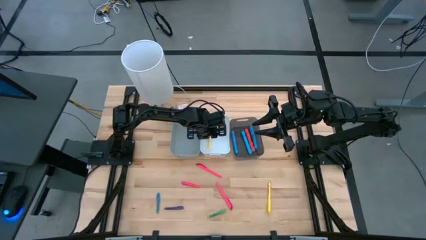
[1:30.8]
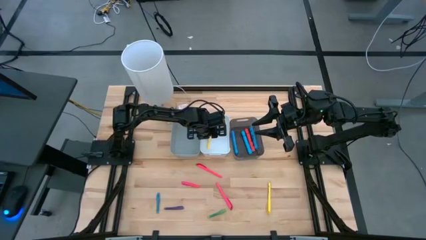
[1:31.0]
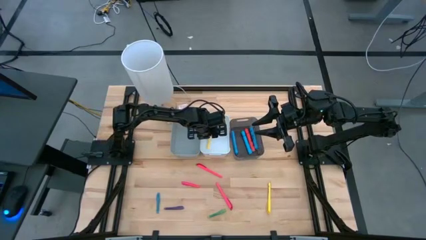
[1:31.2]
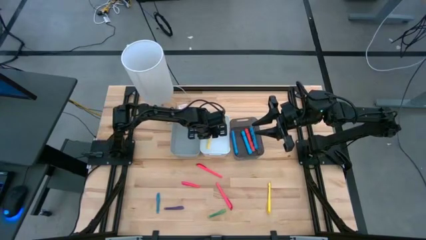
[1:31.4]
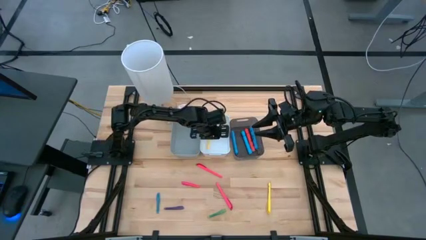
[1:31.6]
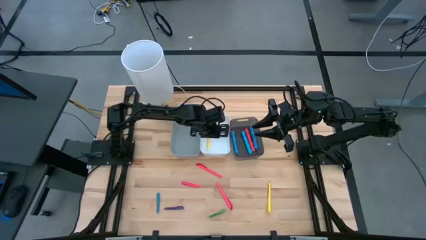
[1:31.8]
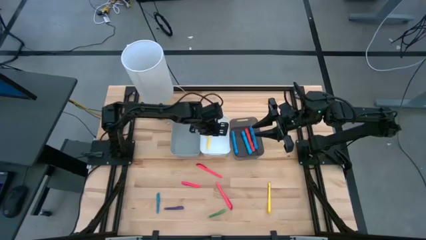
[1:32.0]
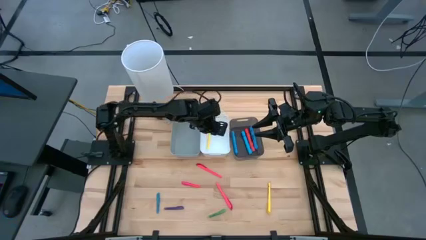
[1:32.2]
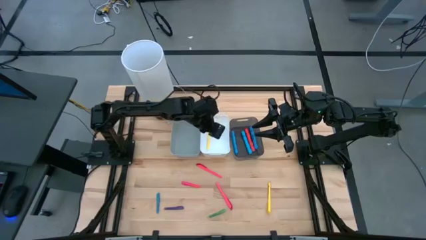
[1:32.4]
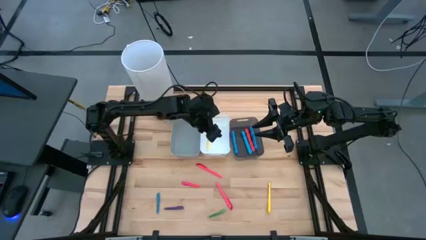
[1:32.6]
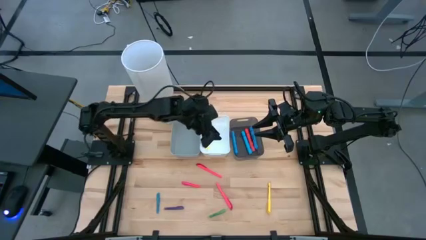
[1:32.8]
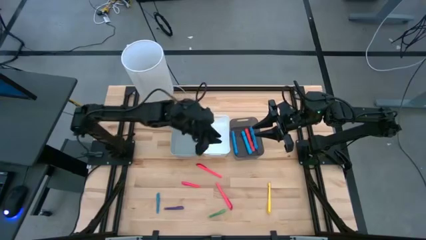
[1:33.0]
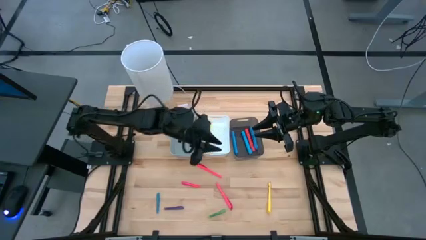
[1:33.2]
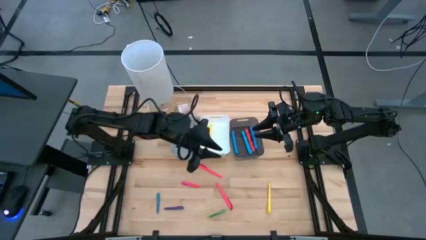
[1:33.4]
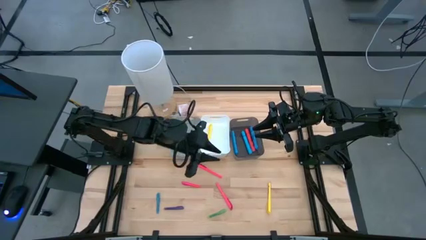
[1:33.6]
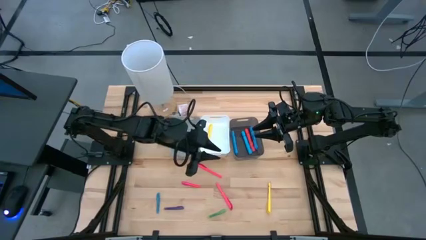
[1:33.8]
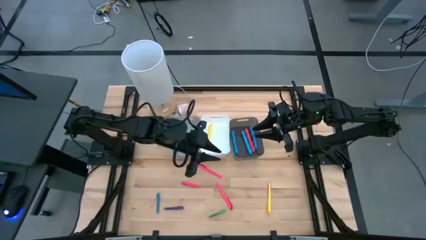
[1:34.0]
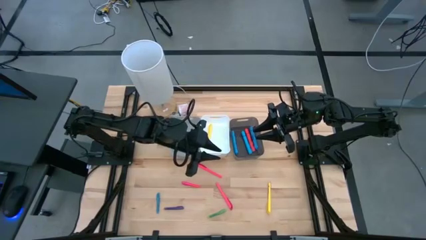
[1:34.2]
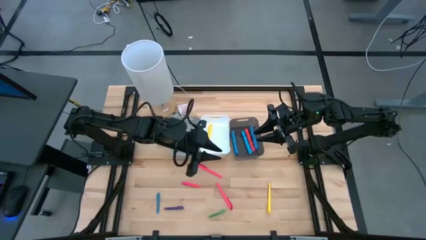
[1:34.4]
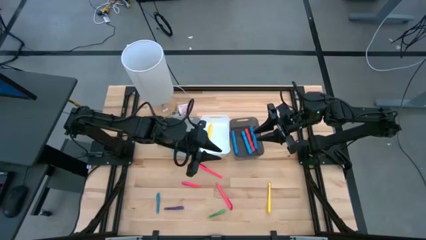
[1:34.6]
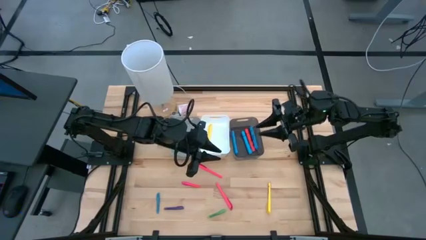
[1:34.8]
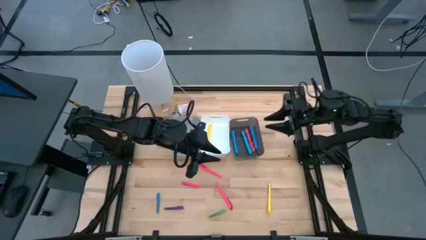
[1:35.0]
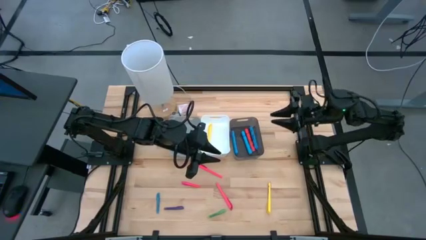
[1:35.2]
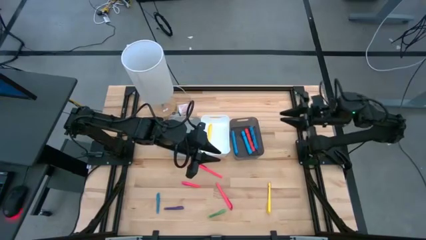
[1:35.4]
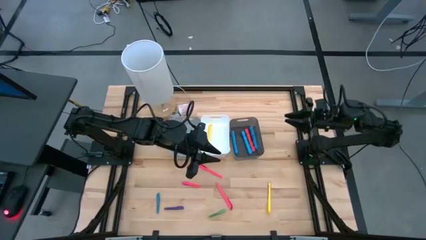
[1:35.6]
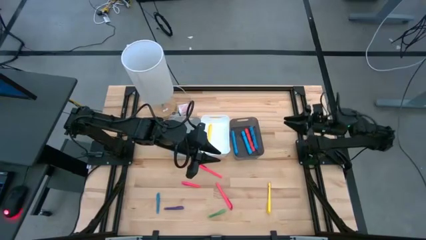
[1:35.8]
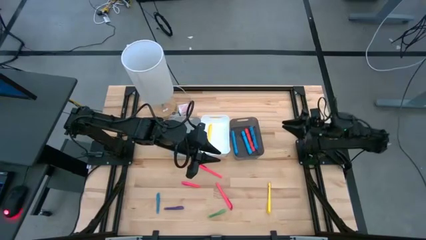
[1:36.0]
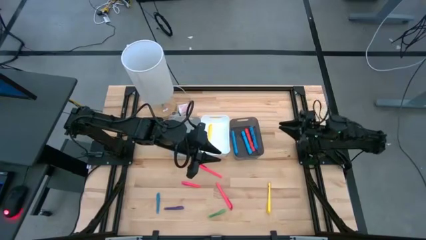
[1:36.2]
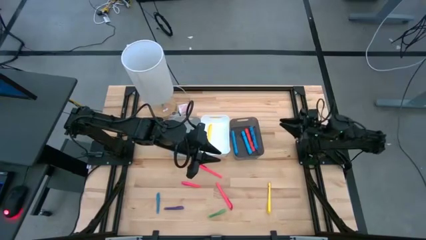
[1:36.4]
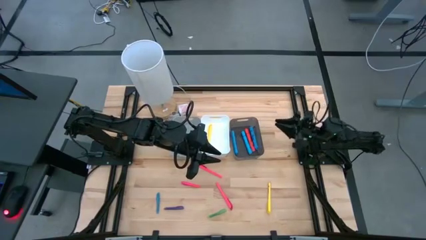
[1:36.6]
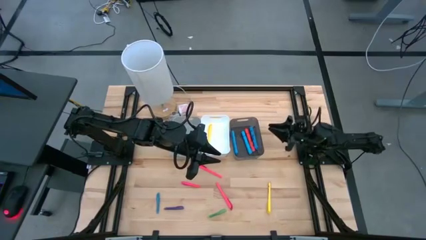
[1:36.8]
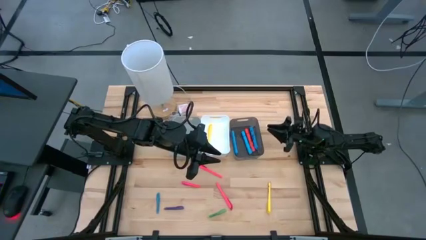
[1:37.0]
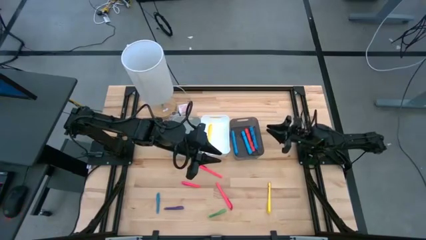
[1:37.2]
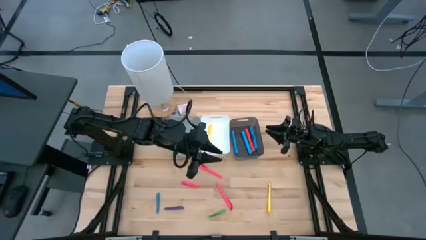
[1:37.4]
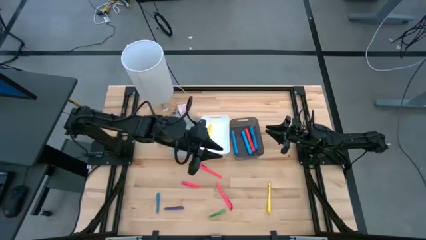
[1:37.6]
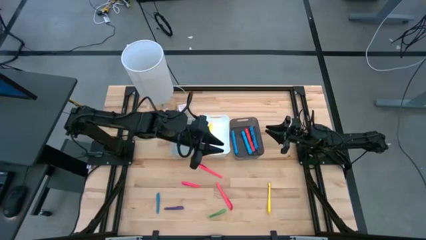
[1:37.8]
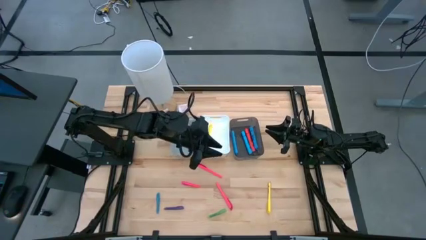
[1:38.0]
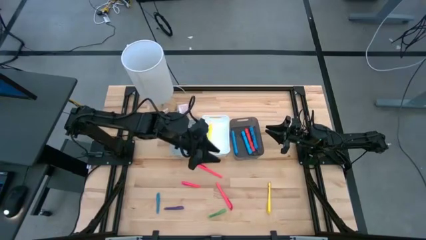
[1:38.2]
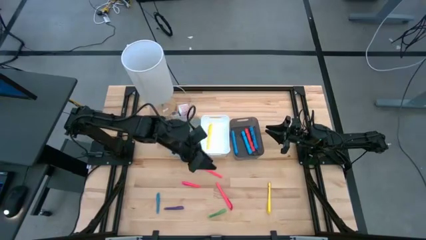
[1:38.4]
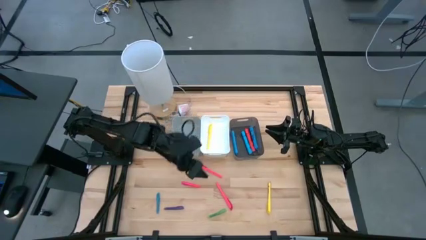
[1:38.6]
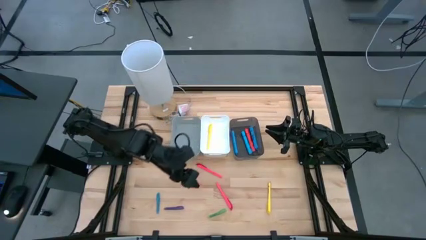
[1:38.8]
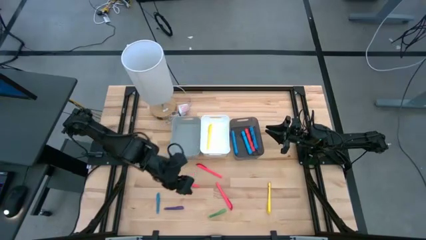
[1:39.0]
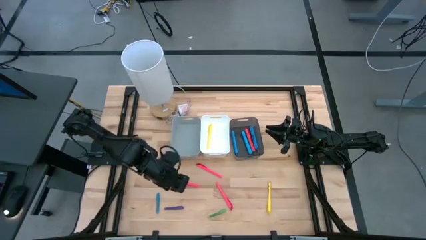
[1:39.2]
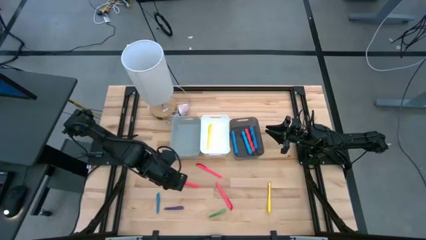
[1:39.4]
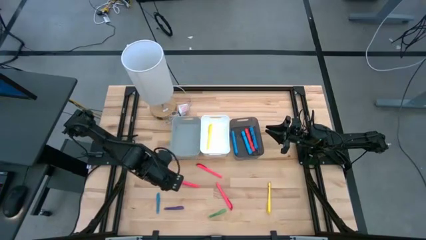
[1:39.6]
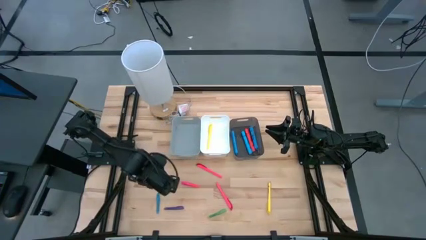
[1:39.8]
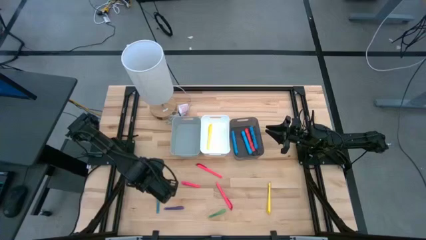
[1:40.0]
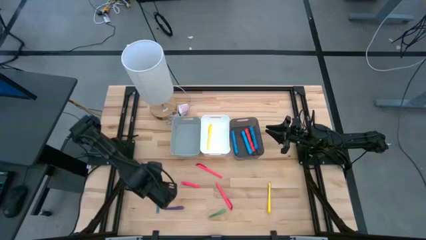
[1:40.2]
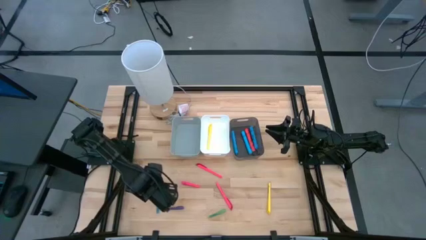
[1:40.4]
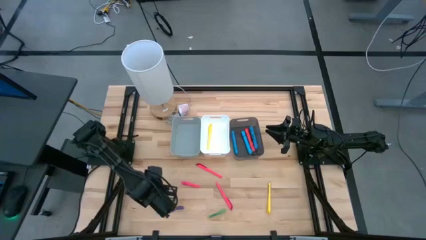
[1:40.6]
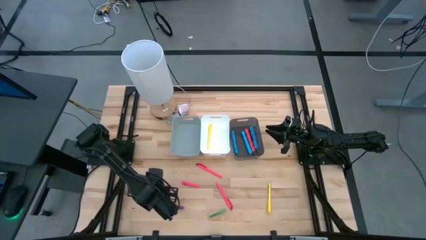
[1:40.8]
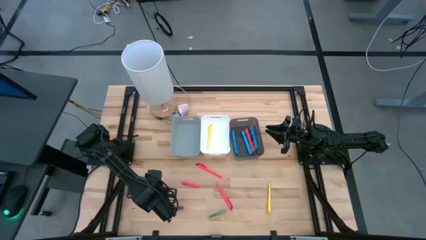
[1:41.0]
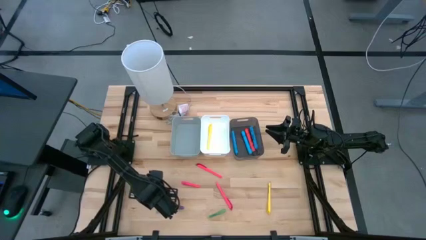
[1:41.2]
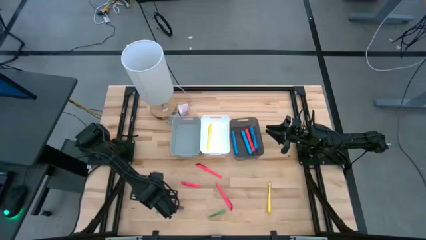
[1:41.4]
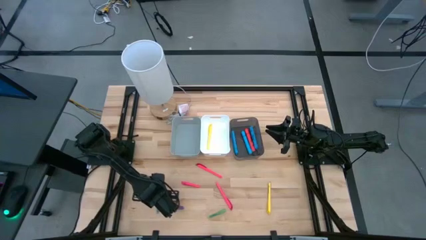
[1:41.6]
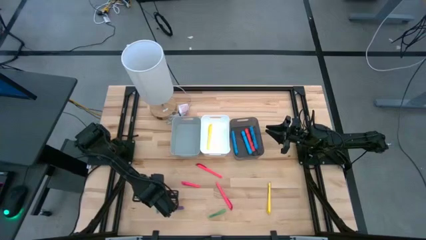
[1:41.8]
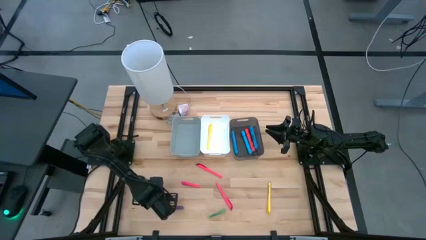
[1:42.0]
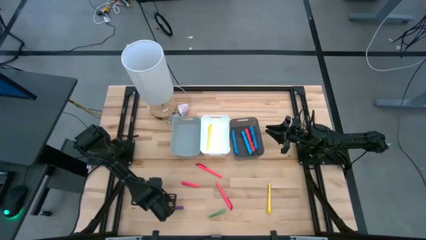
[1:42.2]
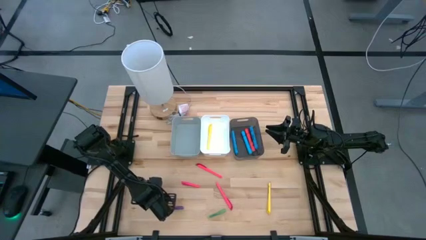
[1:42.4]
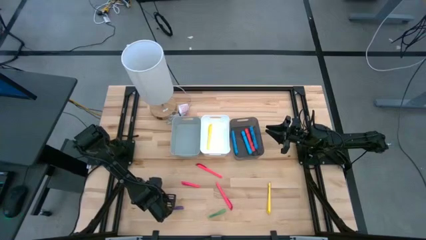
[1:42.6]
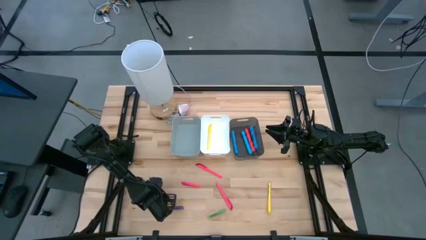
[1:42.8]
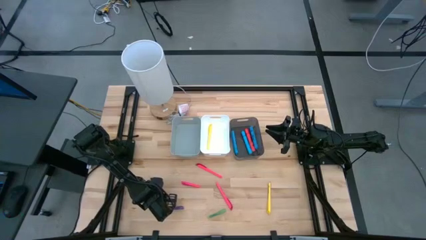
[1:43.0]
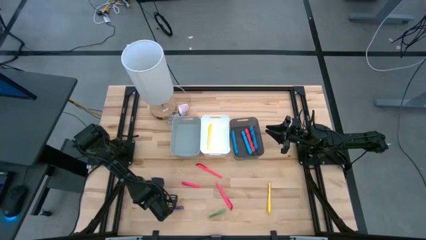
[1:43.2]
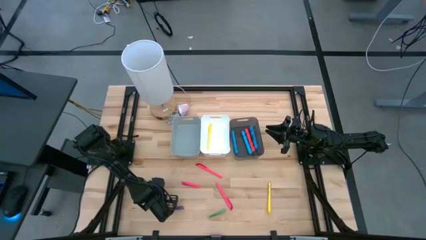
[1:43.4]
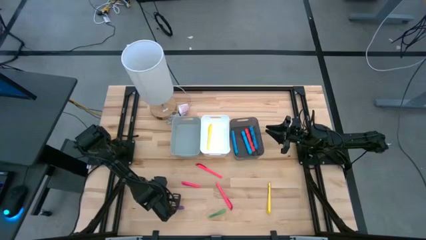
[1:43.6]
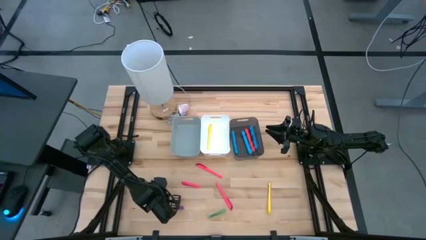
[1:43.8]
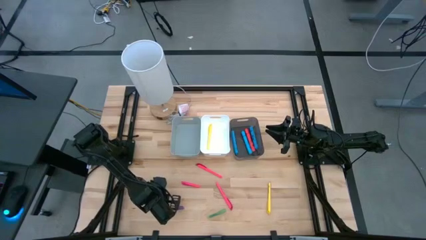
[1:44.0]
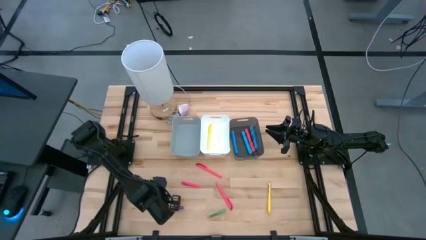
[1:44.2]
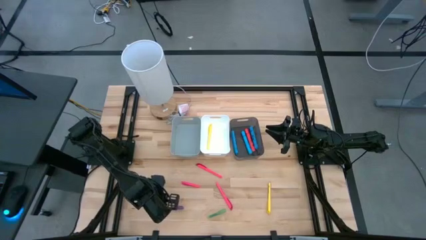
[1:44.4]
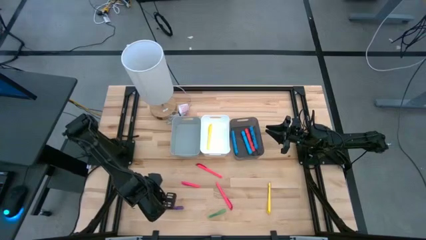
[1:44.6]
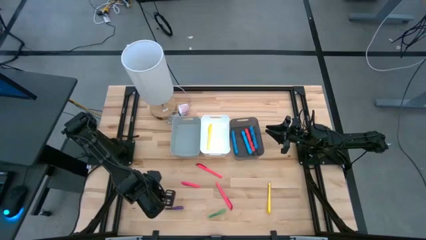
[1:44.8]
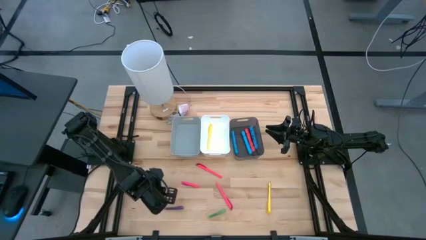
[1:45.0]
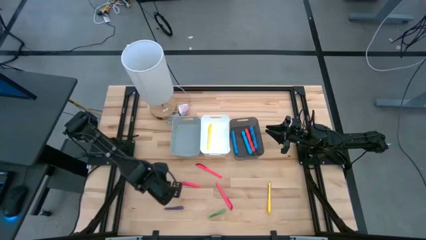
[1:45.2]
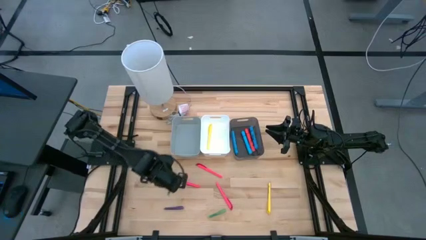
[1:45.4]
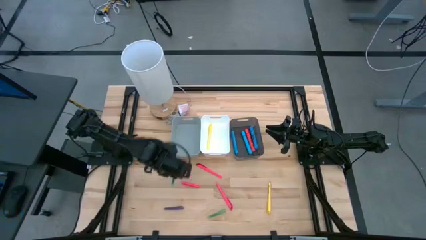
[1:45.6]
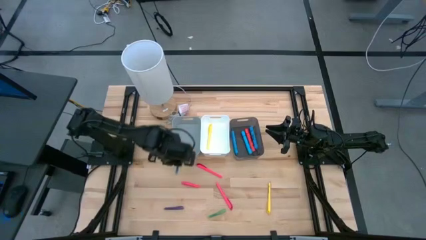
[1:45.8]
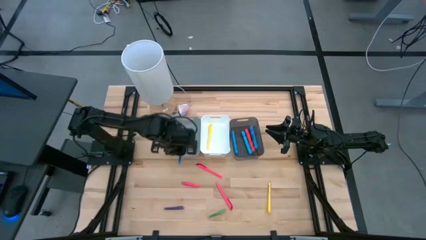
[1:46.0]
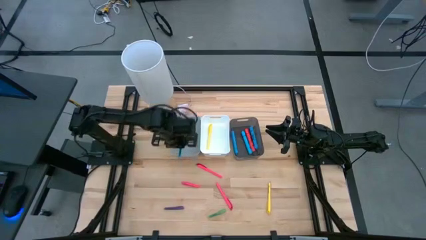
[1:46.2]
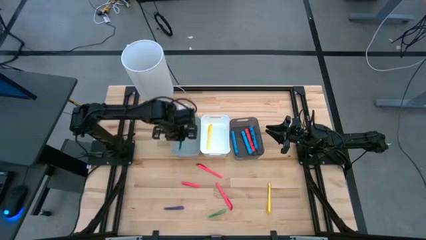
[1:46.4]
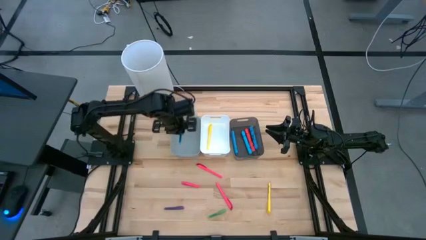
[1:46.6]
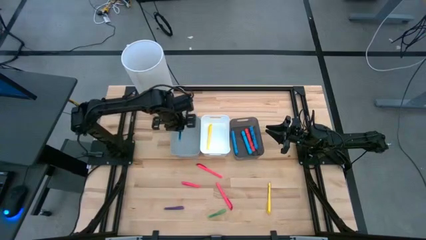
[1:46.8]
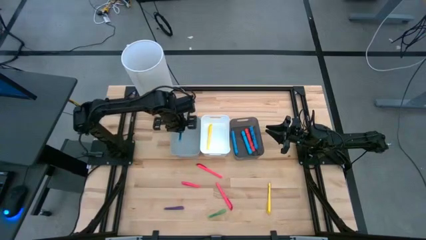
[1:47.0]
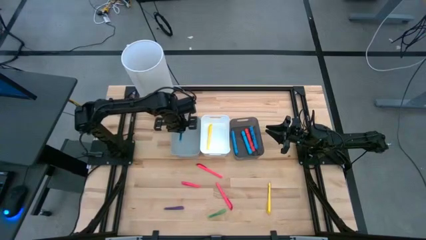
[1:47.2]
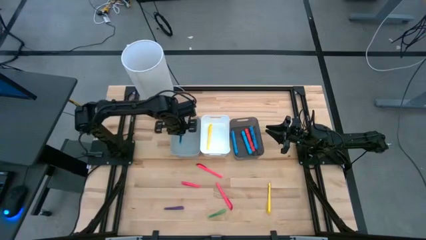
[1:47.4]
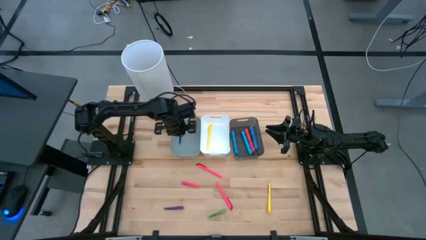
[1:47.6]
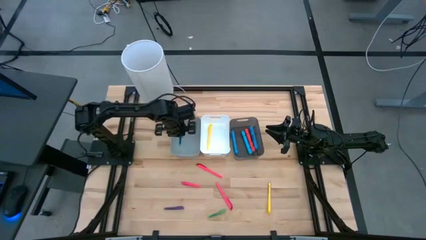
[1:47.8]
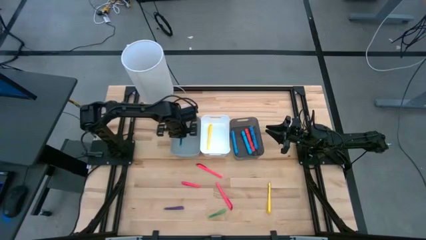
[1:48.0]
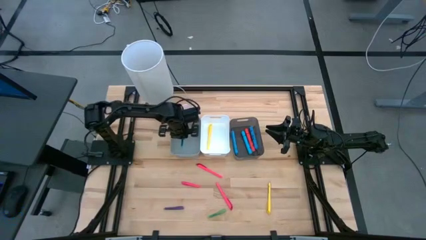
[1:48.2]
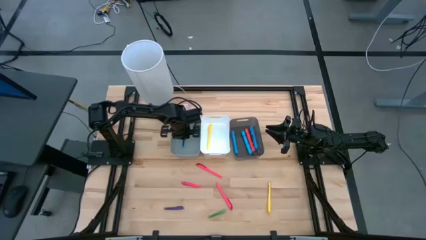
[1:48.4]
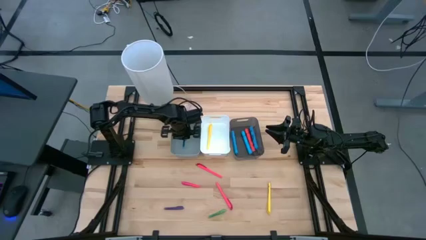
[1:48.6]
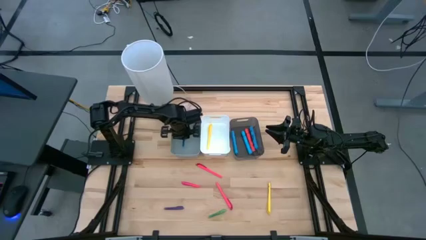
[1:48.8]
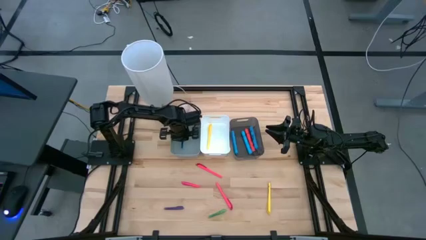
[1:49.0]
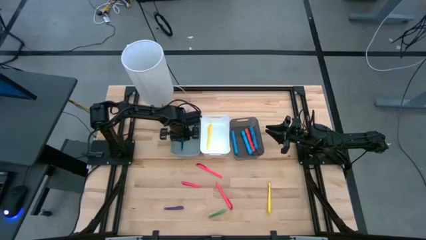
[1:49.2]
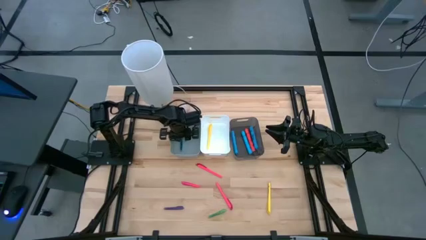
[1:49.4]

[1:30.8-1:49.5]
Task: Pick & Place Markers
Put the blue pen into the gray bin
